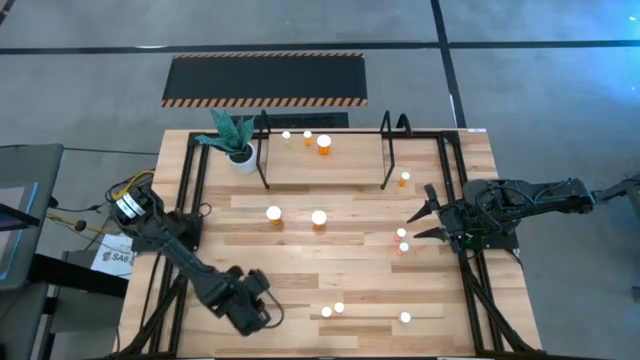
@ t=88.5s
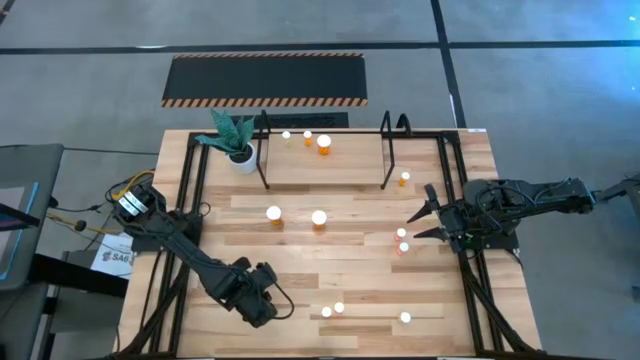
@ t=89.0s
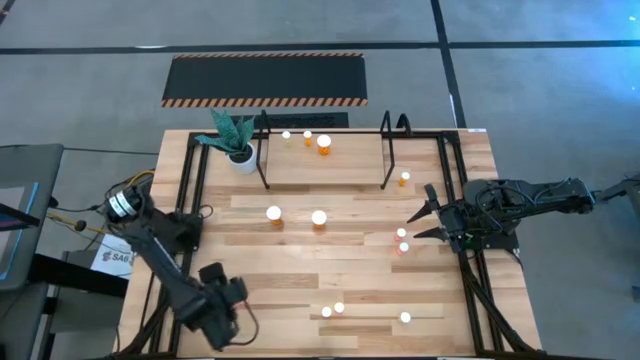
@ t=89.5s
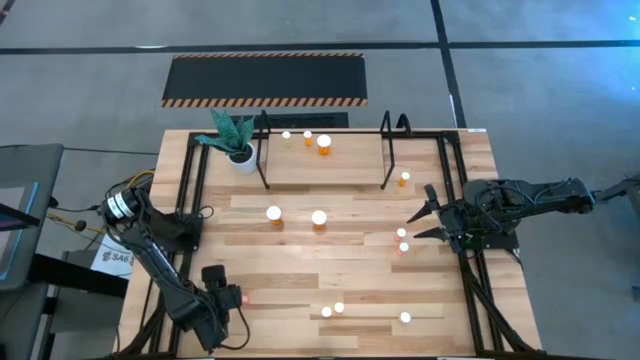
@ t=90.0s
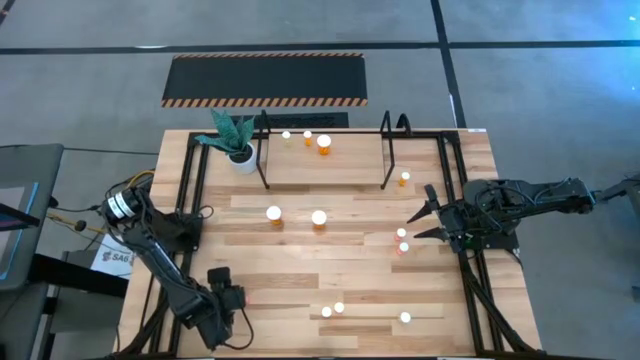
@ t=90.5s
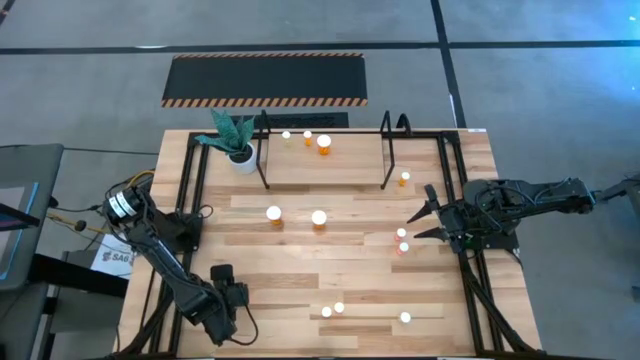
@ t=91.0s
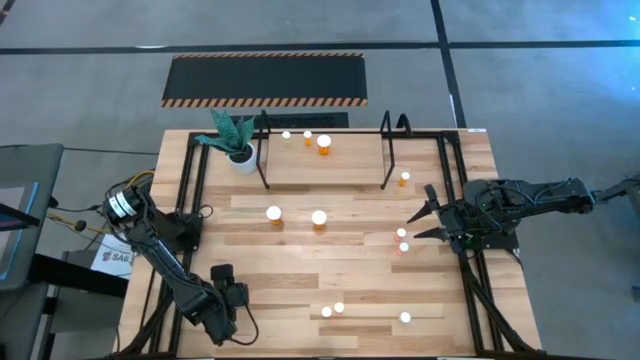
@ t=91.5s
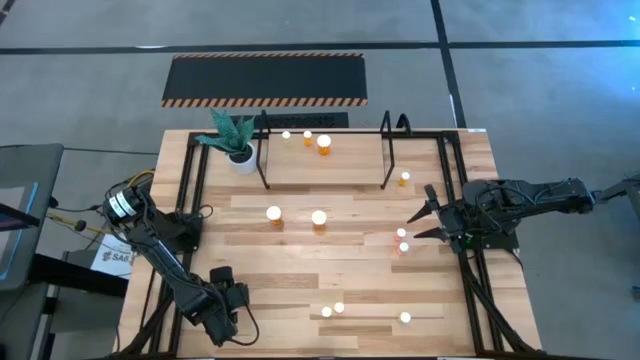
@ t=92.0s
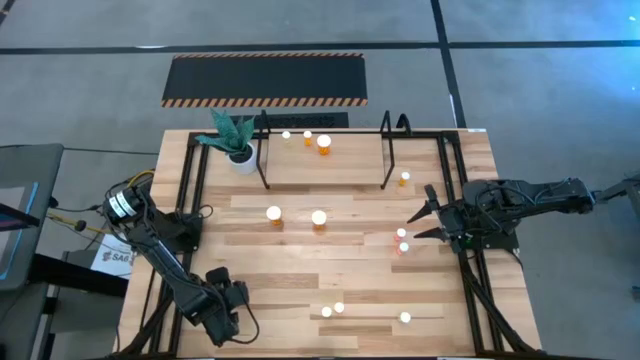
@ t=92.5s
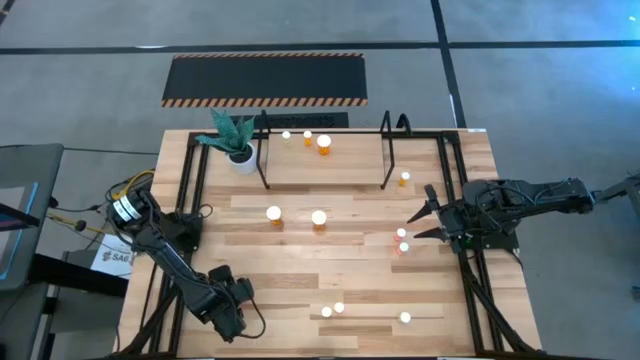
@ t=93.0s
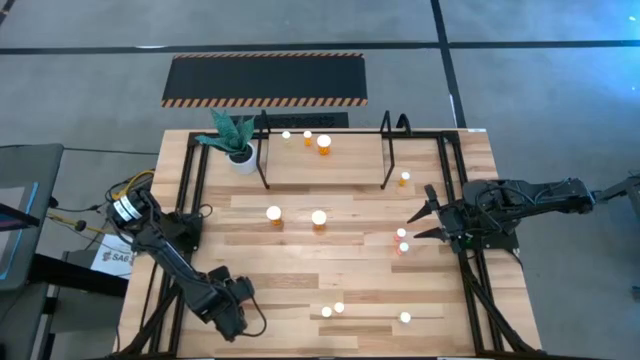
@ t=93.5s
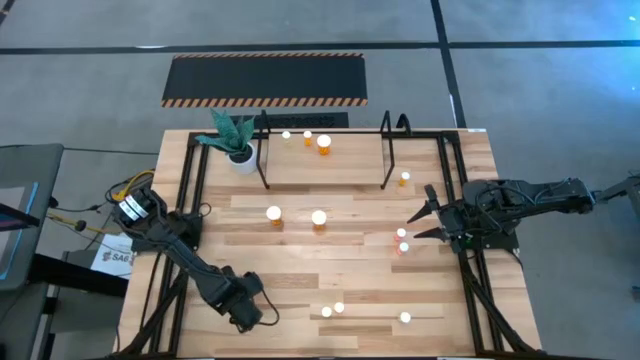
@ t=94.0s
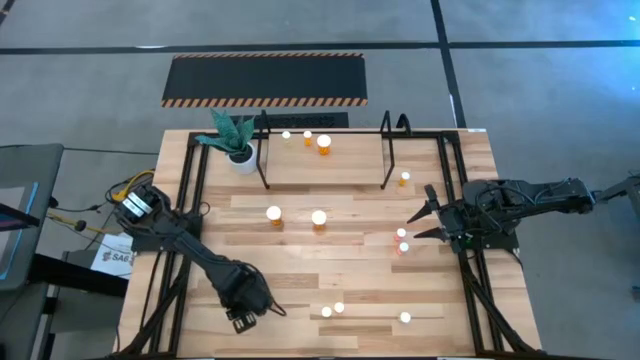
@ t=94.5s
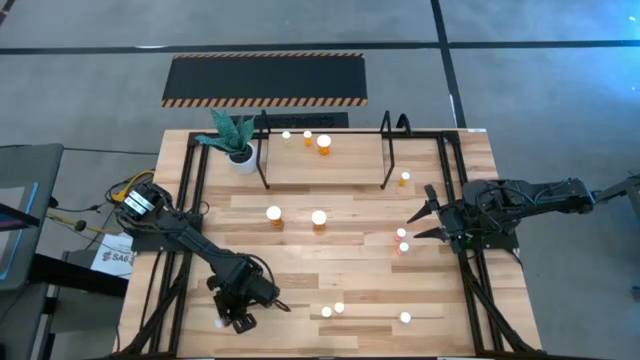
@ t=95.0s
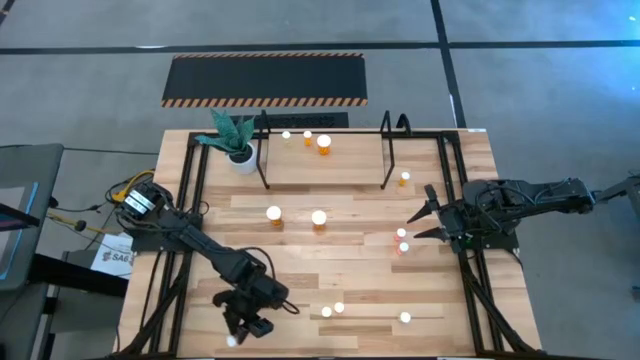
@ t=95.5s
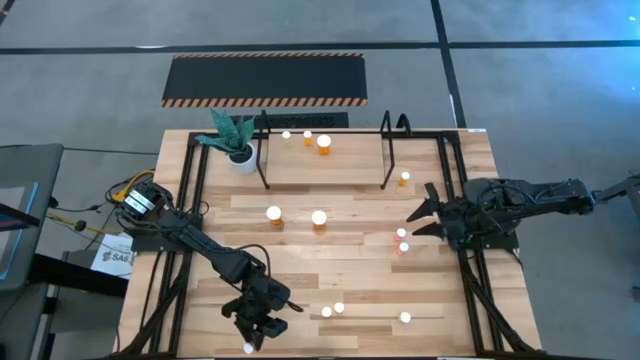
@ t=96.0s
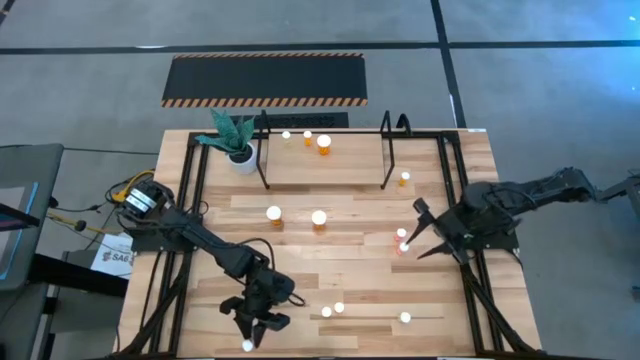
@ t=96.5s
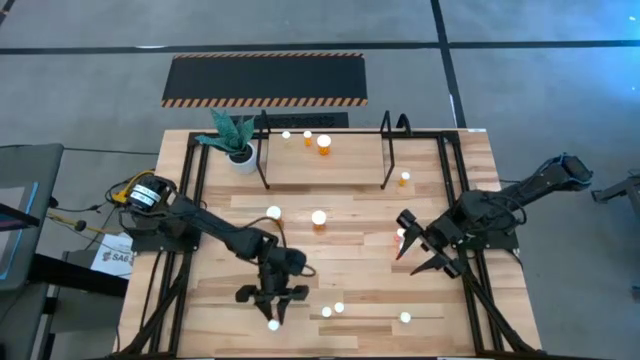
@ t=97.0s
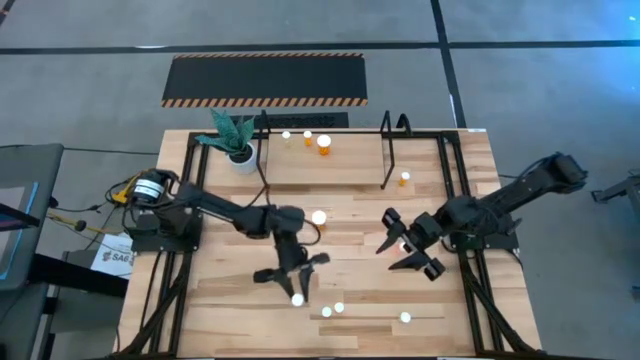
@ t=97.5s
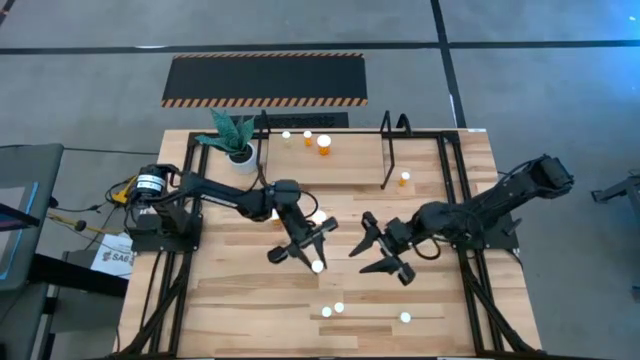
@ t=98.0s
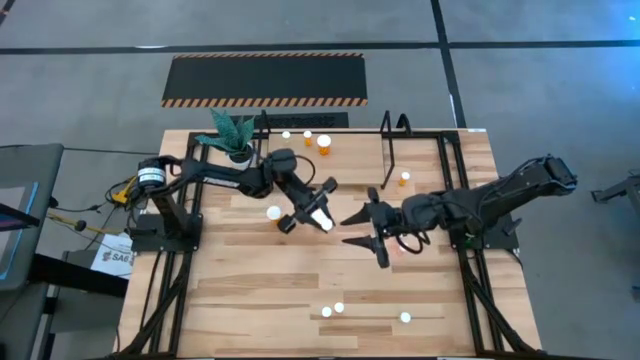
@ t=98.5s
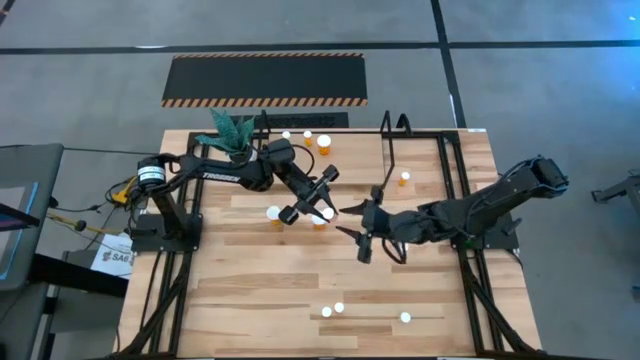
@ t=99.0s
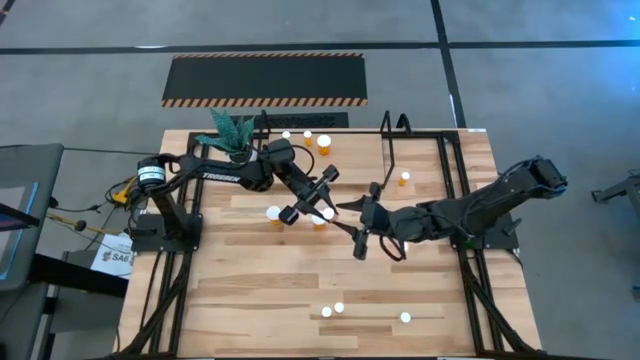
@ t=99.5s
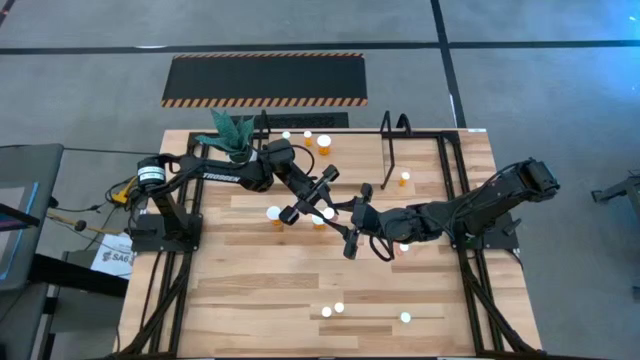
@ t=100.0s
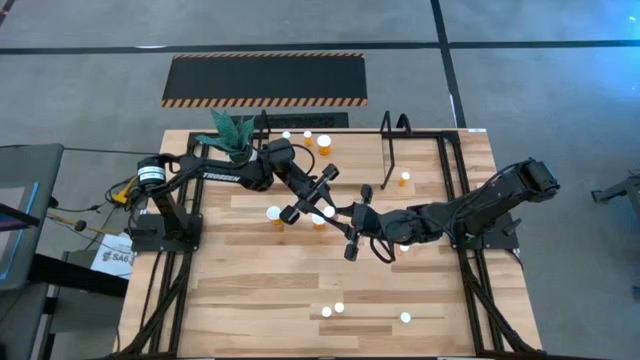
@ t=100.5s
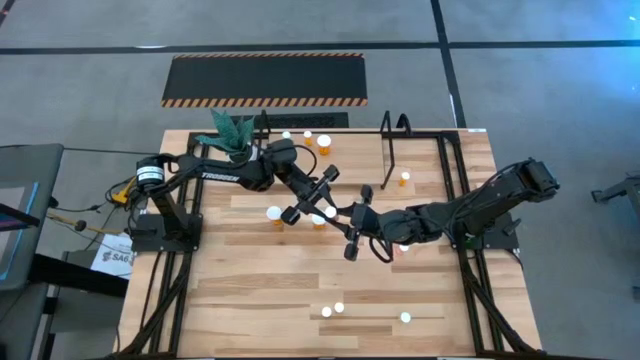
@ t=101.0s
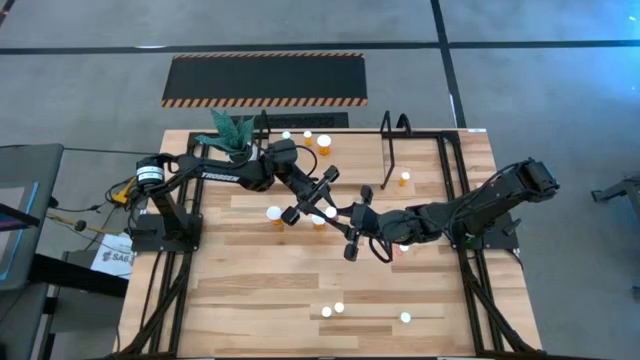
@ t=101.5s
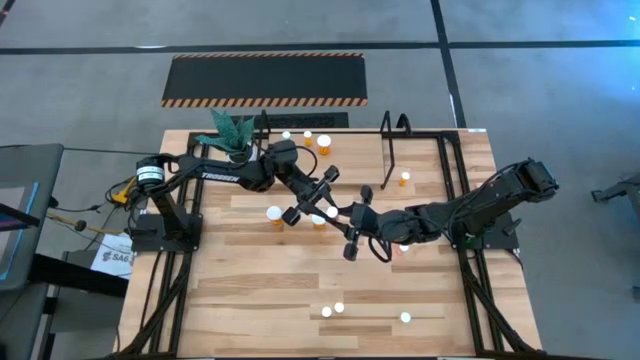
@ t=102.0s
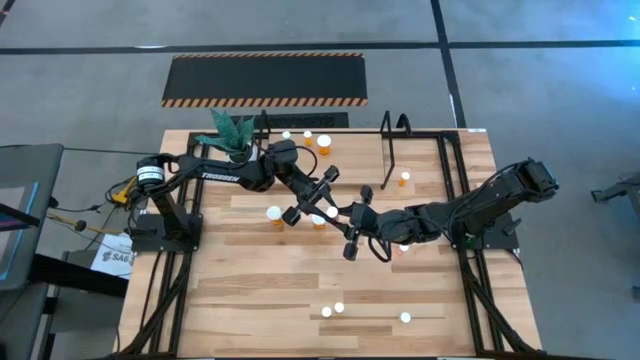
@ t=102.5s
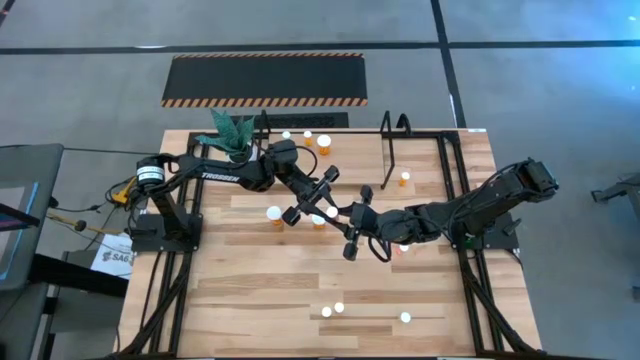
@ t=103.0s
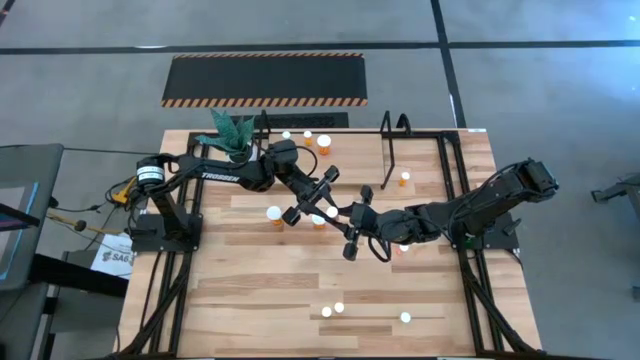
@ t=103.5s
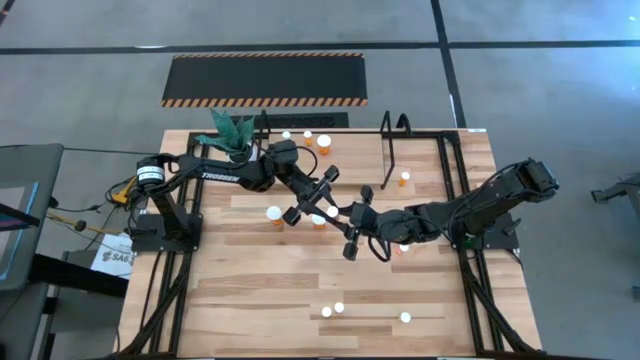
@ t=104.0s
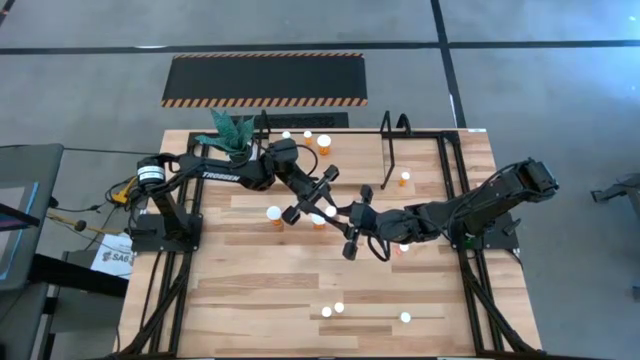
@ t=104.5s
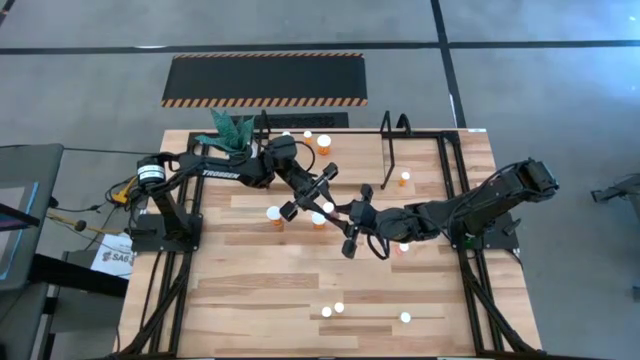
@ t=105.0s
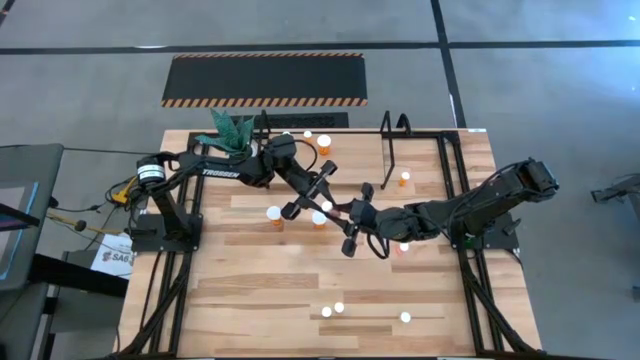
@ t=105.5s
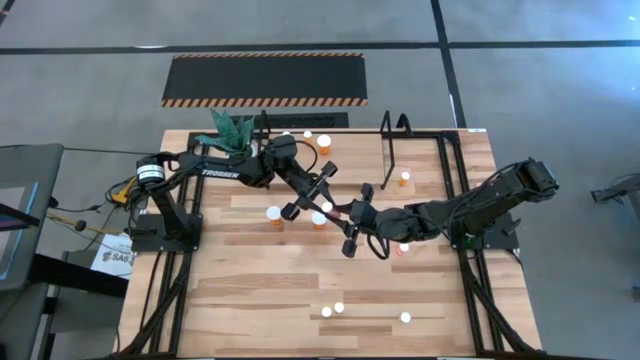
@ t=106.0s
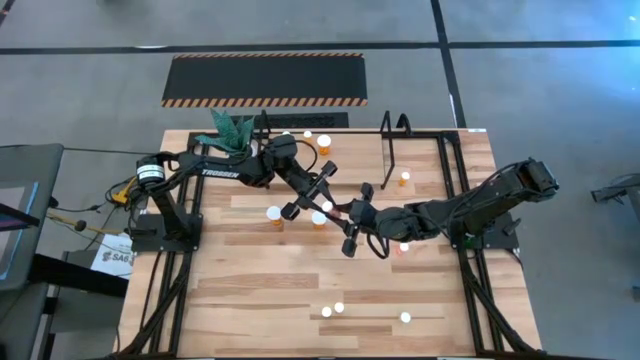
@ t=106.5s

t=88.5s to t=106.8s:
Task: Pick and place medicine bottles onto shelf by color
Put the bottom left pink pill bottle on the shelf
